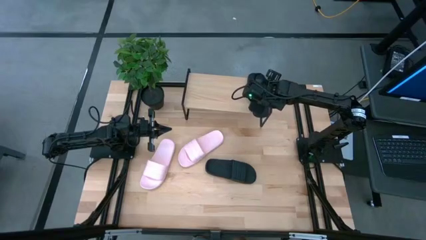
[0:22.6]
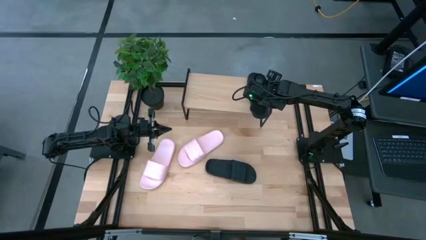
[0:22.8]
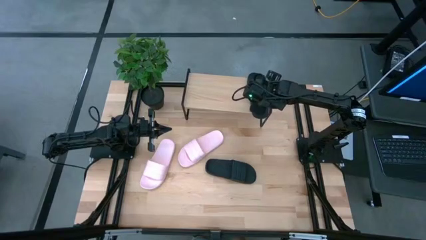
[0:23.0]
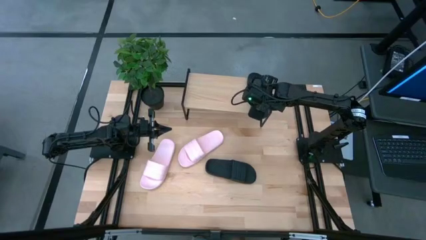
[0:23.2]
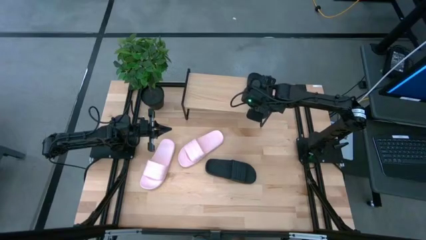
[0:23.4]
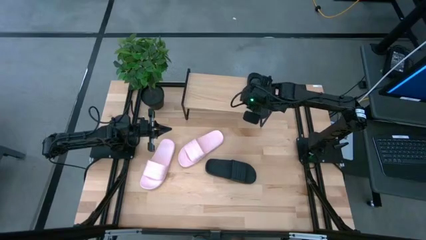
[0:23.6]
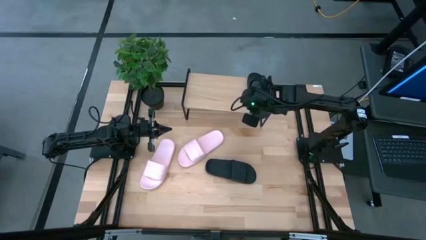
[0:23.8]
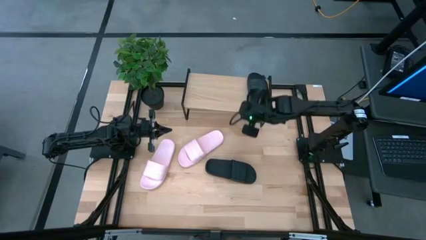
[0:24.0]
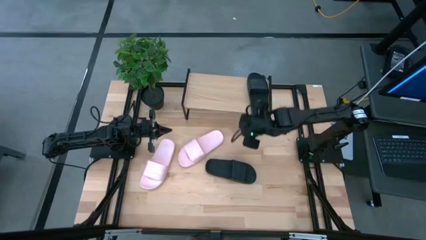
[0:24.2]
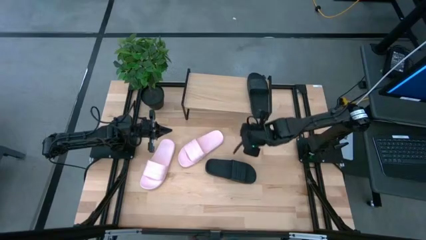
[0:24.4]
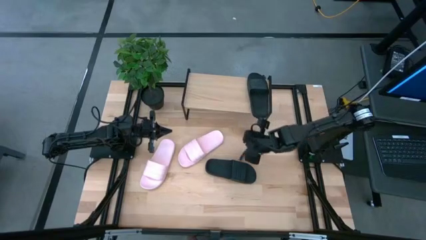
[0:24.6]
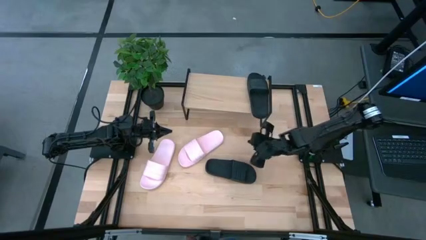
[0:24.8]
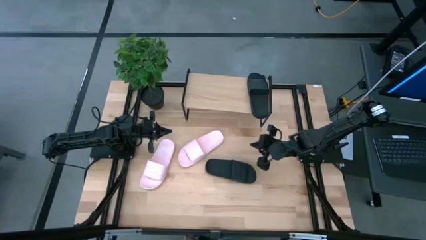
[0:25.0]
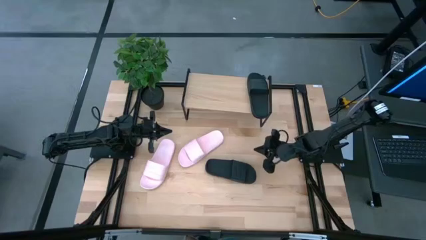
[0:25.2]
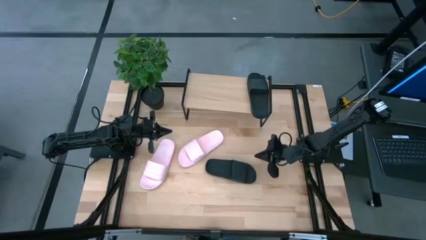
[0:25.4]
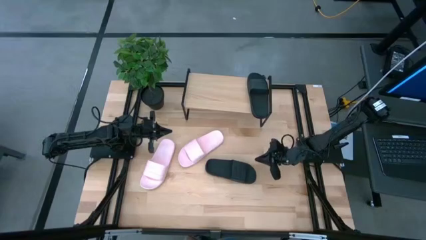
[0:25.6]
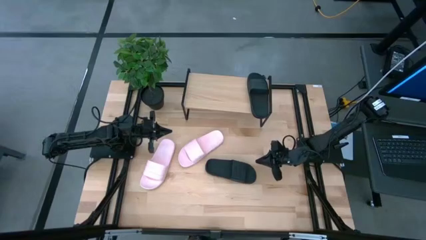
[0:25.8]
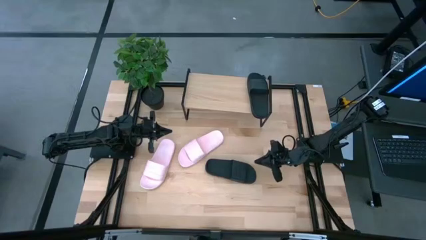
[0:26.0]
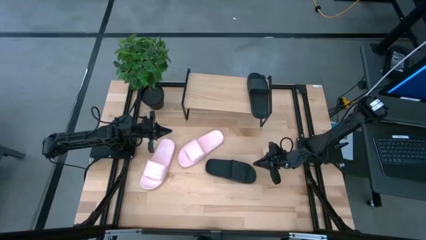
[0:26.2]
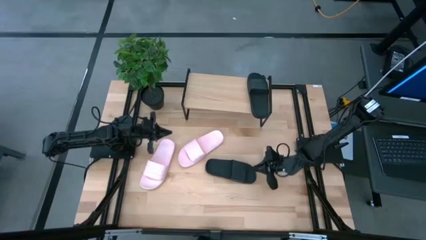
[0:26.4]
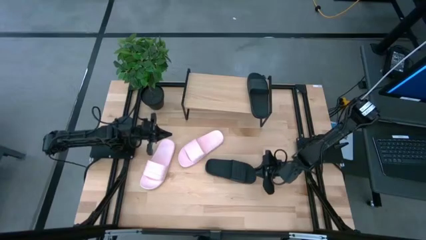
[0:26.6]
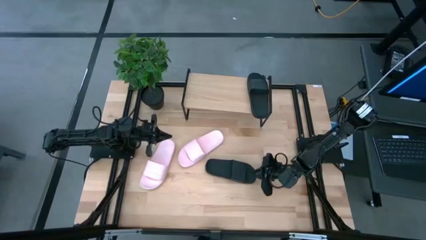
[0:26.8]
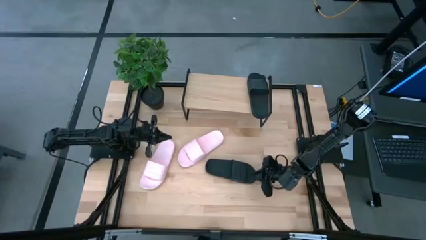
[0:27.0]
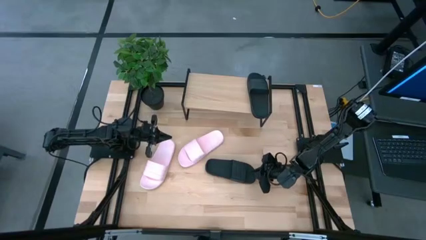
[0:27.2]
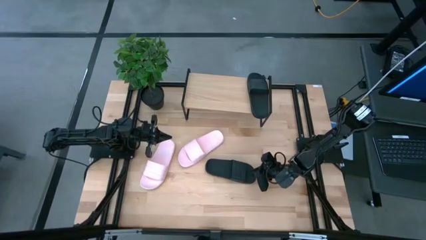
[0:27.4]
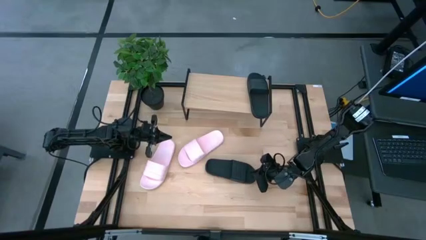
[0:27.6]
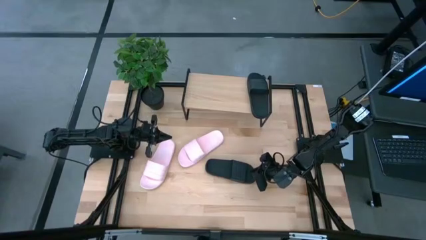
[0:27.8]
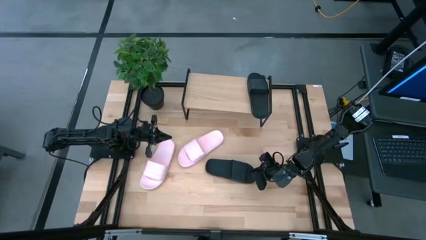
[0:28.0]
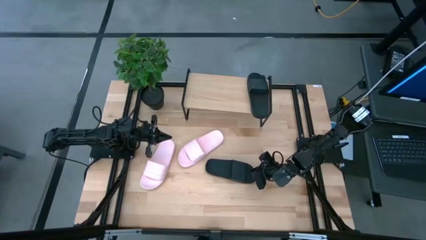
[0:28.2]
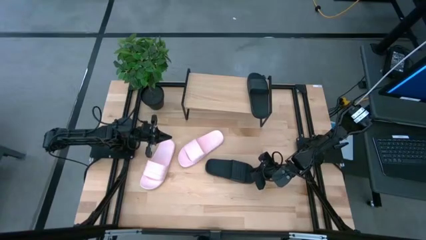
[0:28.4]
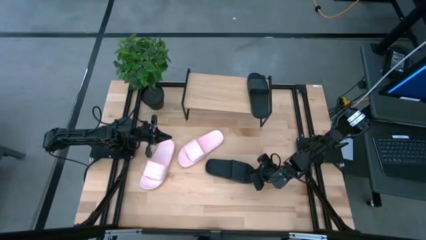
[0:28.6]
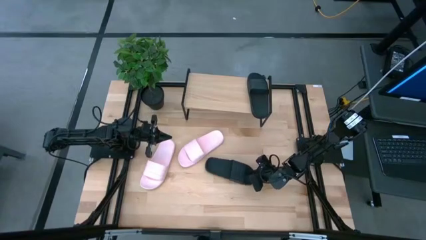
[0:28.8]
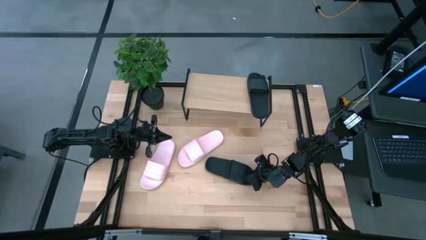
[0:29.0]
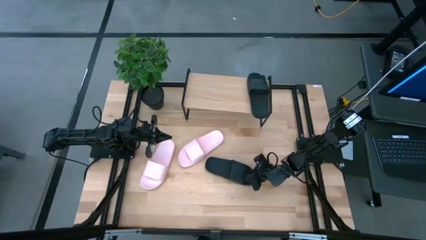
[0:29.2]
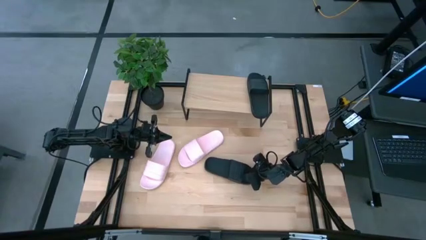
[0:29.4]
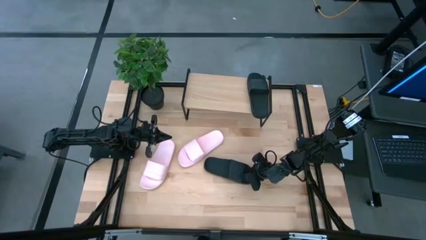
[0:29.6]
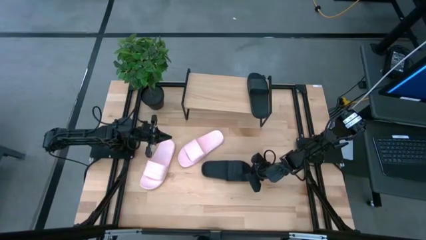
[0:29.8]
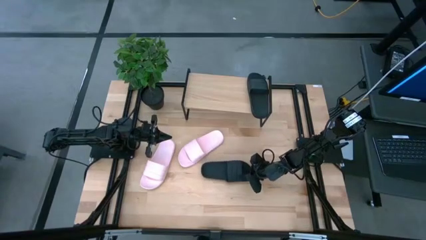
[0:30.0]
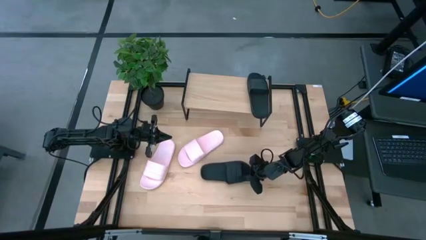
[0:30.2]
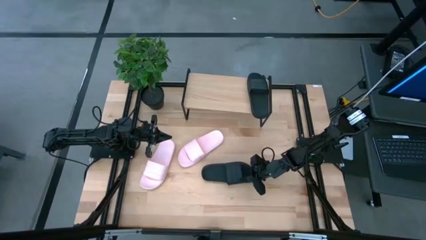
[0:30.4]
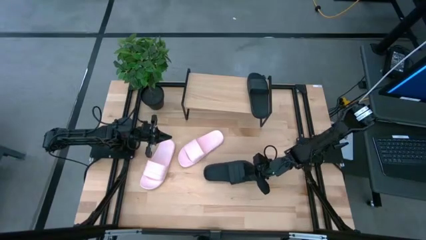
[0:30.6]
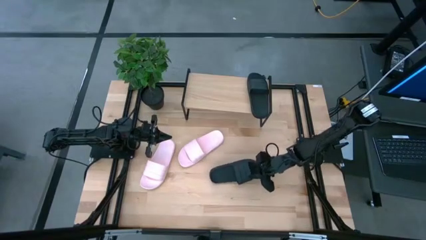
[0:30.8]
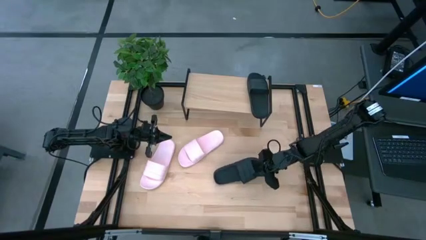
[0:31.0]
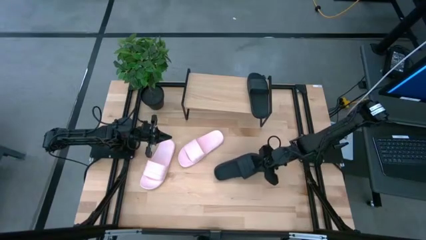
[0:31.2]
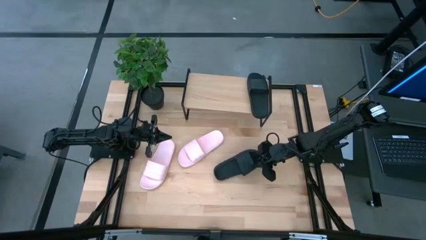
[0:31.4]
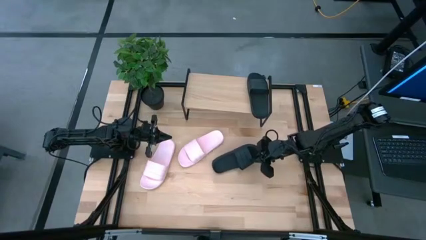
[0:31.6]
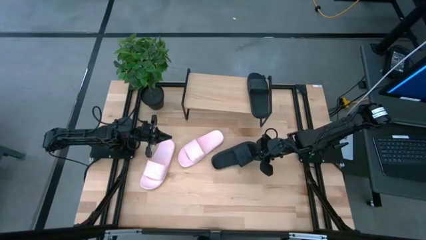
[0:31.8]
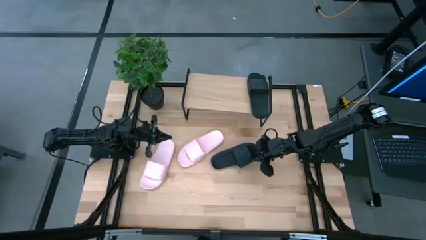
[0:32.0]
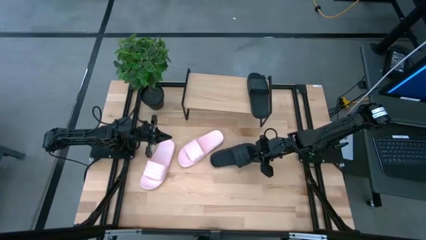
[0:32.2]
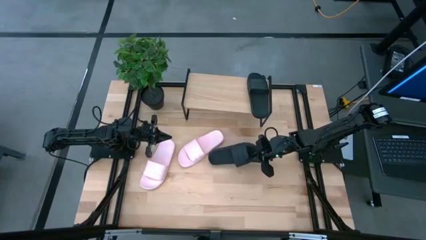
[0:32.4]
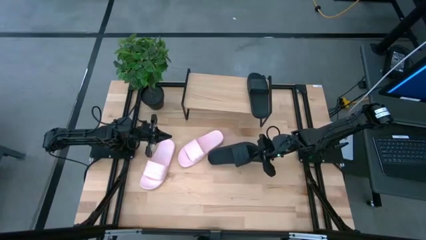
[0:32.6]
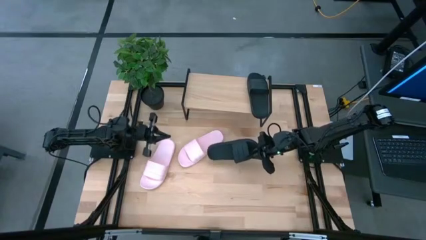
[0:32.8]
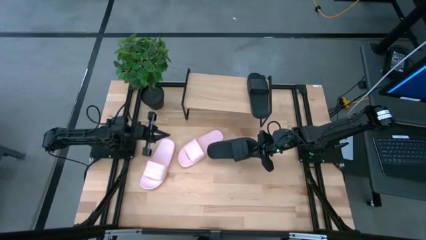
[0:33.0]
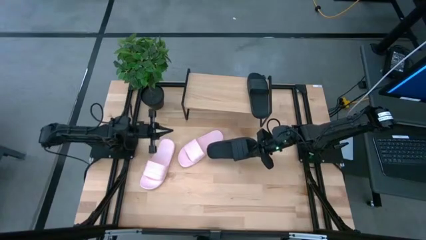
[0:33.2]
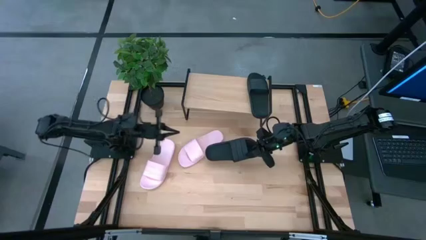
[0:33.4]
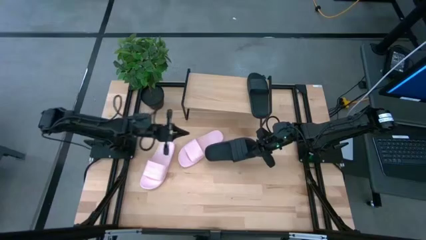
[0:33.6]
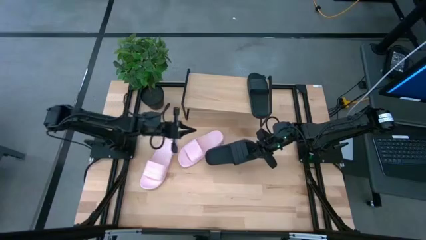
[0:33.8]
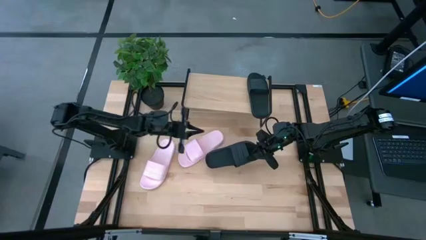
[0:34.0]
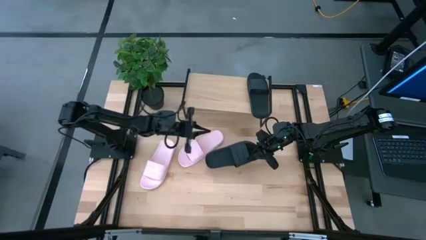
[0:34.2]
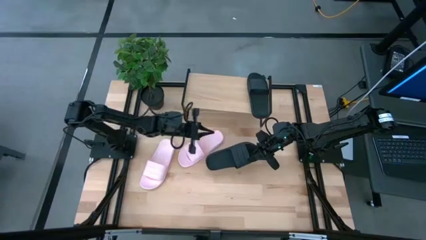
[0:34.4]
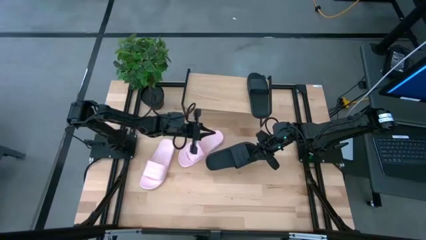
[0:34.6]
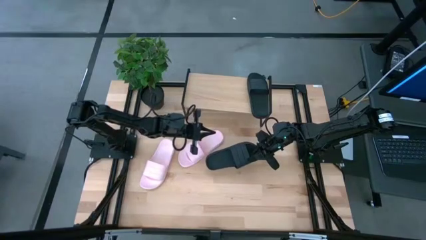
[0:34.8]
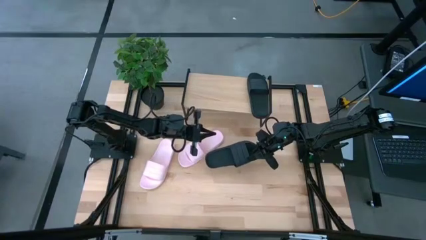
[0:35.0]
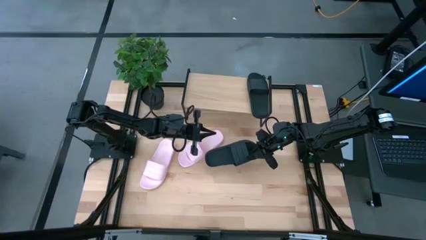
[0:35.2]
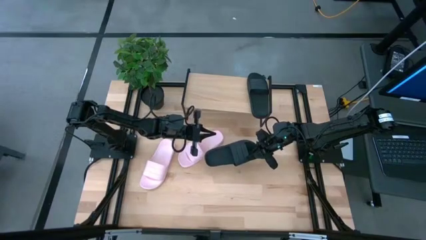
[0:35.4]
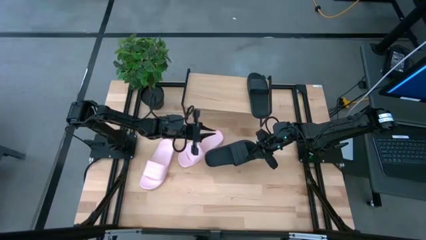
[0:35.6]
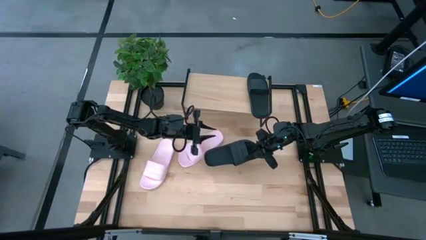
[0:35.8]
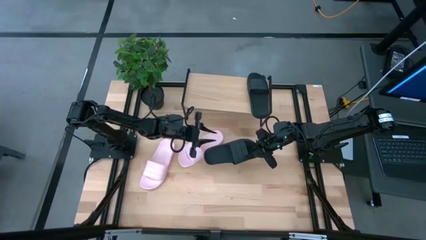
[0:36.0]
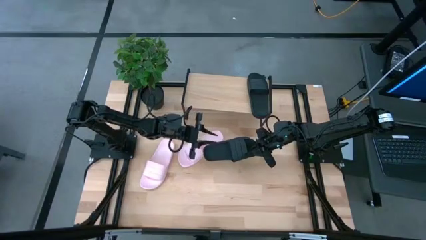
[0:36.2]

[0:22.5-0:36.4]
Task: Pick and place slides into the shelf
Put the black slide on the shelf

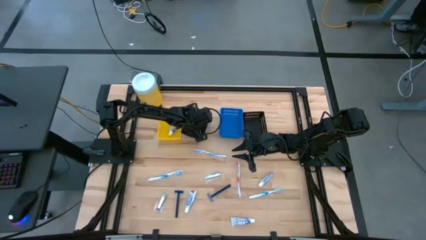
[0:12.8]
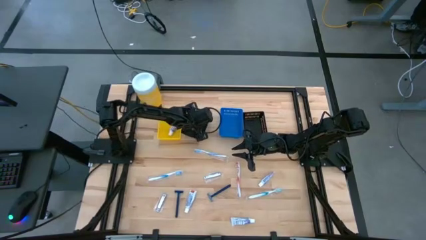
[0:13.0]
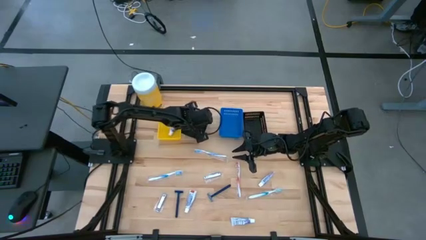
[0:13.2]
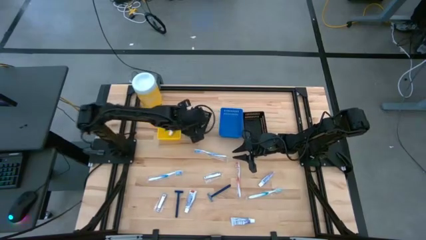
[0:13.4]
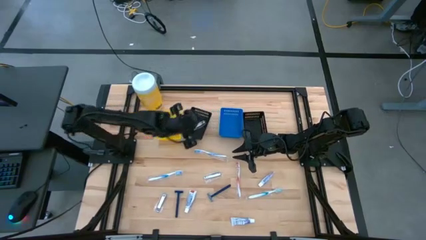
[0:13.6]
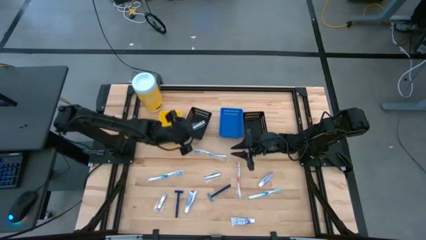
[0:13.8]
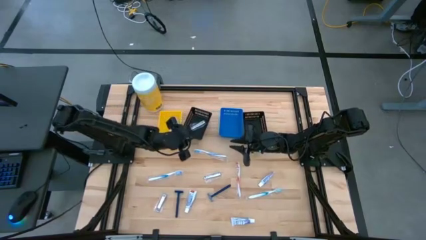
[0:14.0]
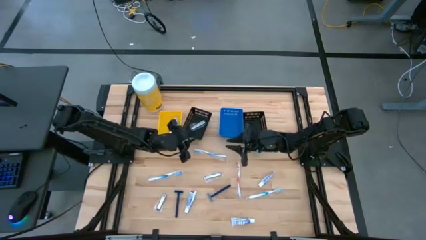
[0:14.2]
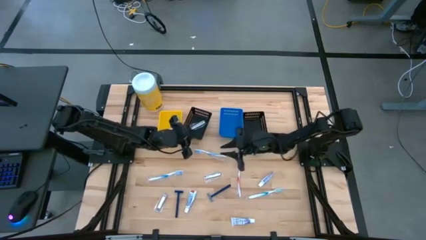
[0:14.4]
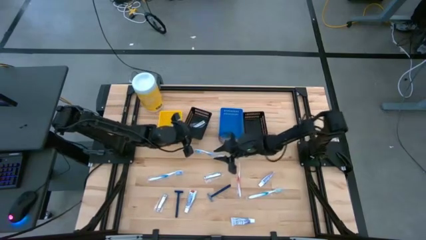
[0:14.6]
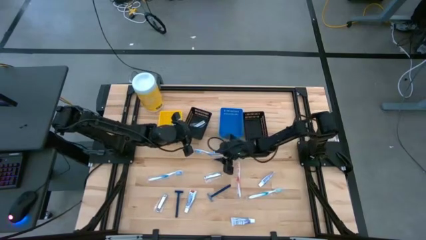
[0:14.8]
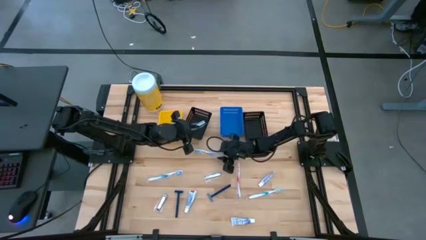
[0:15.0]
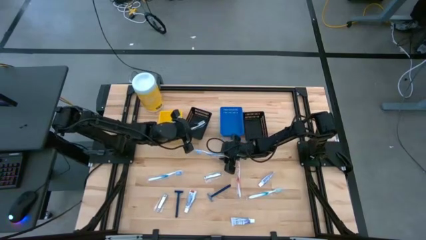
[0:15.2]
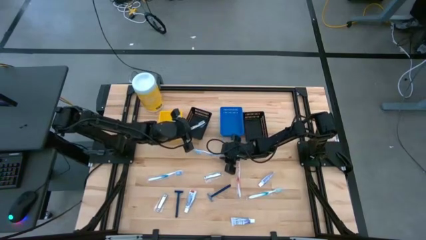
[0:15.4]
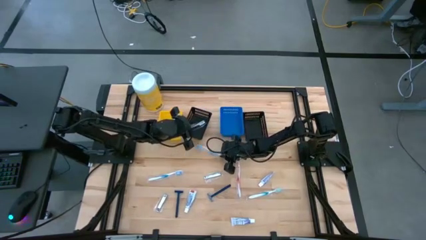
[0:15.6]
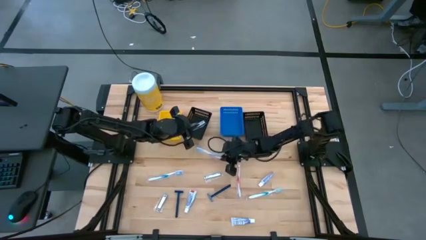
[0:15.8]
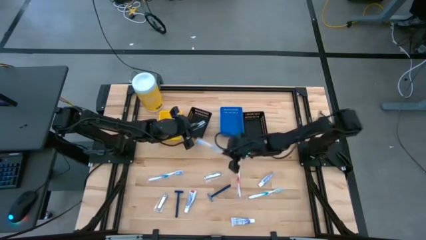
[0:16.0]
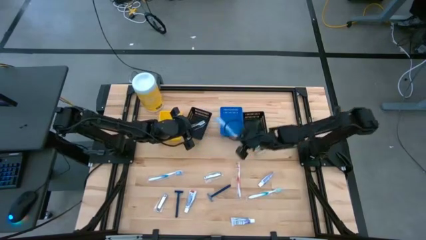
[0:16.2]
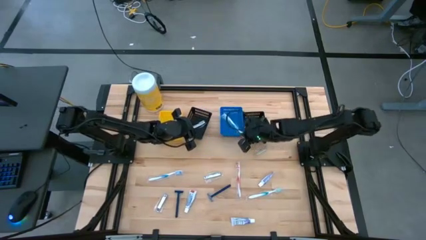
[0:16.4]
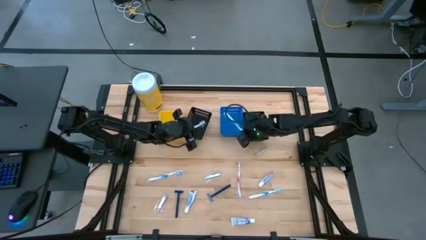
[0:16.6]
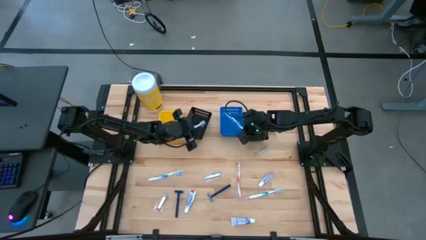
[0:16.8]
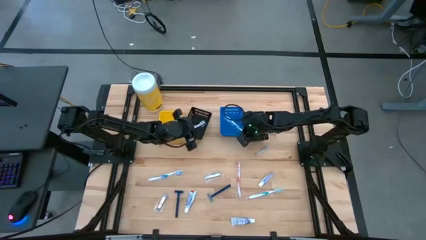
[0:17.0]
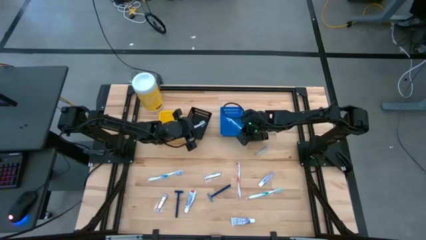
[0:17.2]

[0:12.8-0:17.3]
Task: Pick & Place Travel size toiletries
Put the blue toothbrush into the blue bin
